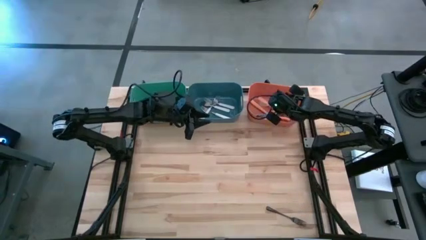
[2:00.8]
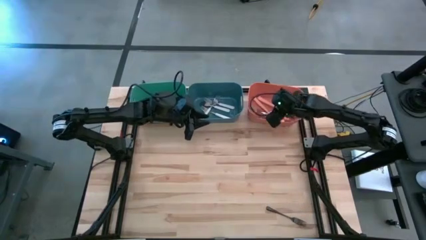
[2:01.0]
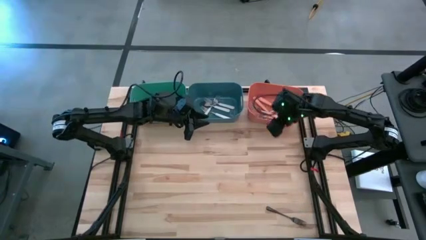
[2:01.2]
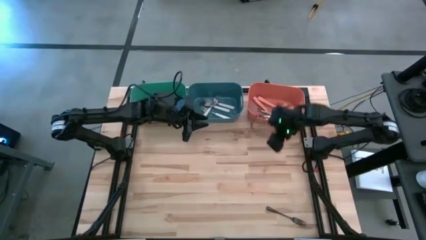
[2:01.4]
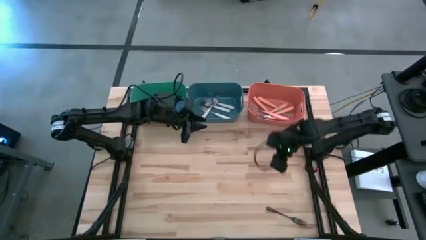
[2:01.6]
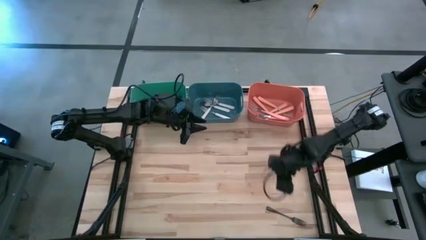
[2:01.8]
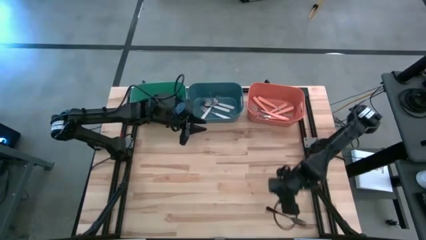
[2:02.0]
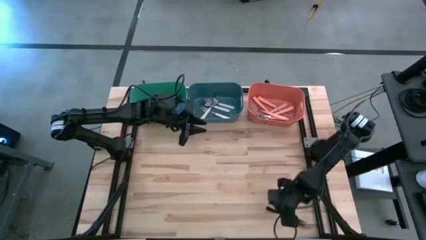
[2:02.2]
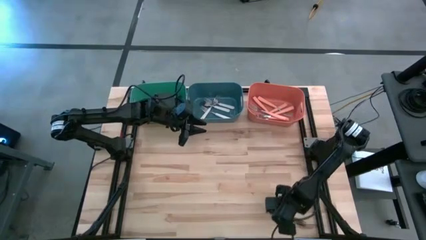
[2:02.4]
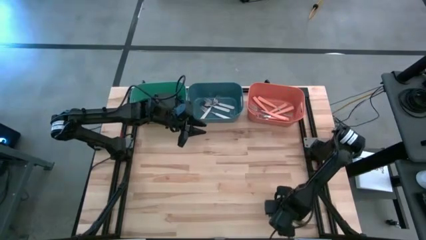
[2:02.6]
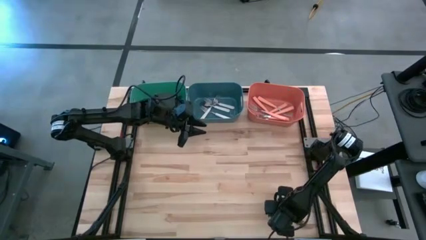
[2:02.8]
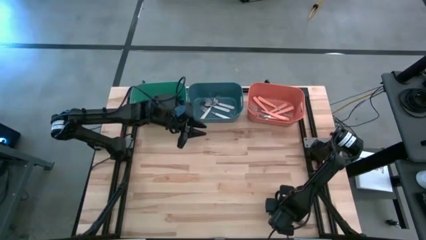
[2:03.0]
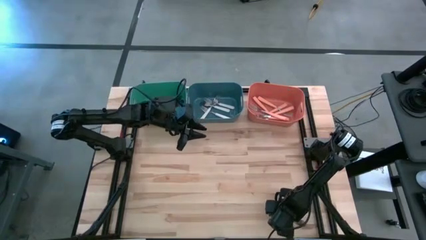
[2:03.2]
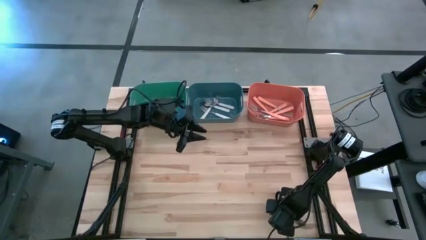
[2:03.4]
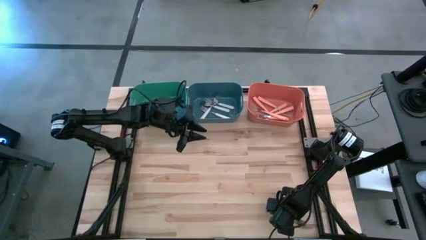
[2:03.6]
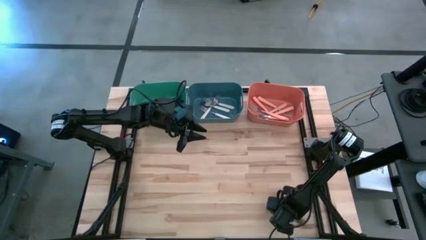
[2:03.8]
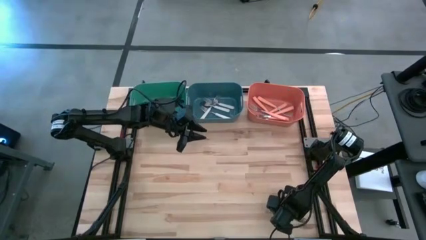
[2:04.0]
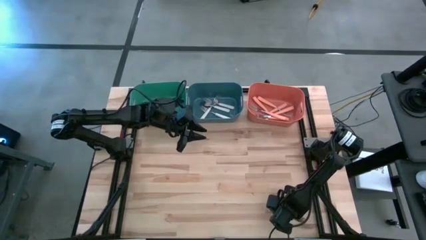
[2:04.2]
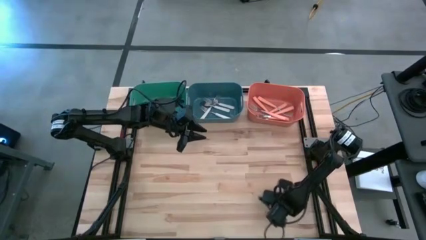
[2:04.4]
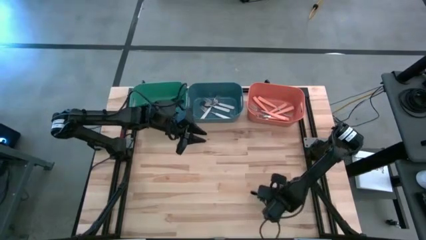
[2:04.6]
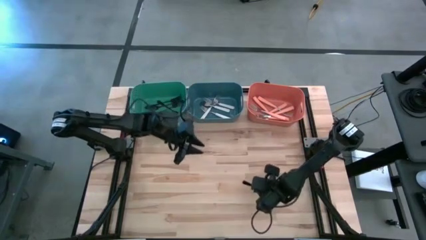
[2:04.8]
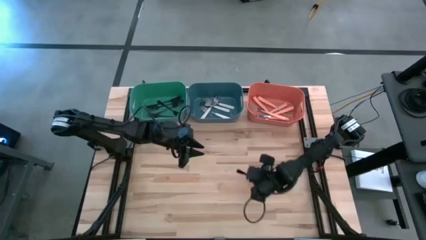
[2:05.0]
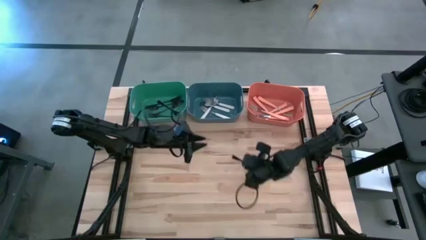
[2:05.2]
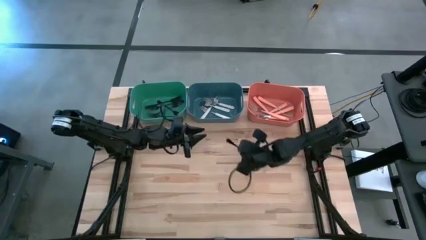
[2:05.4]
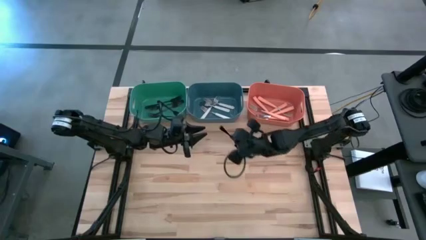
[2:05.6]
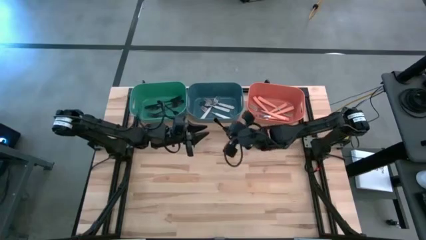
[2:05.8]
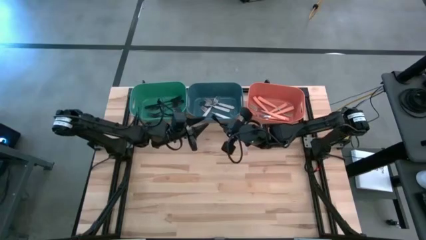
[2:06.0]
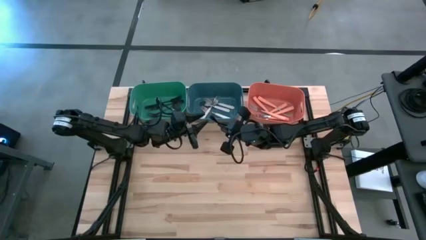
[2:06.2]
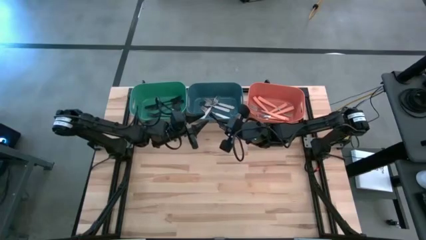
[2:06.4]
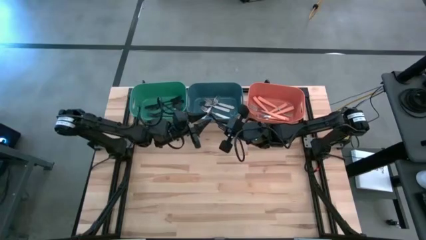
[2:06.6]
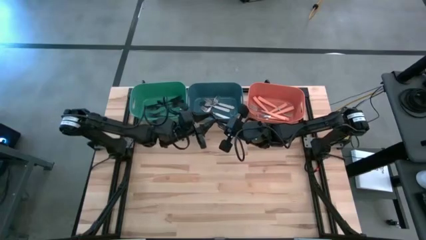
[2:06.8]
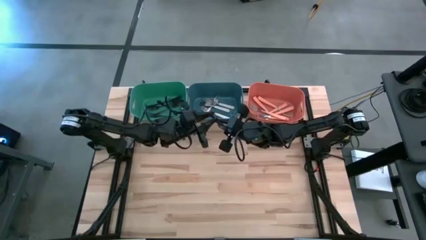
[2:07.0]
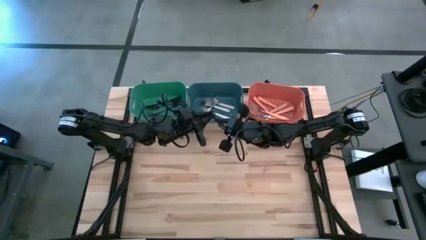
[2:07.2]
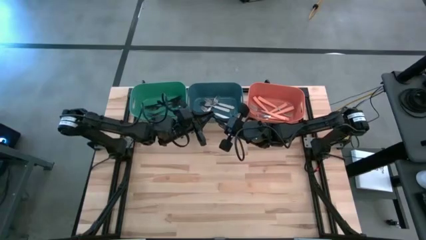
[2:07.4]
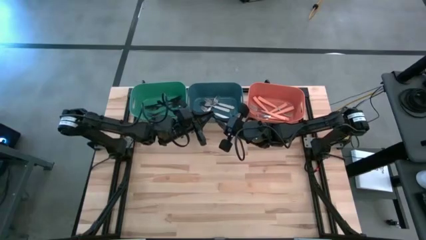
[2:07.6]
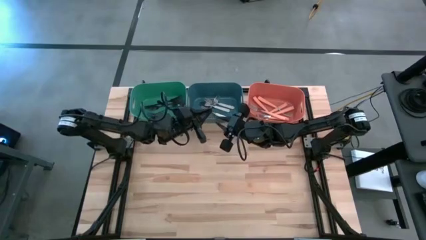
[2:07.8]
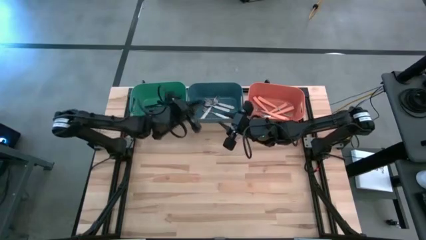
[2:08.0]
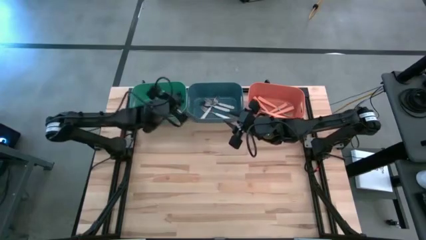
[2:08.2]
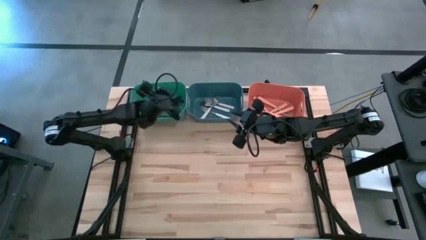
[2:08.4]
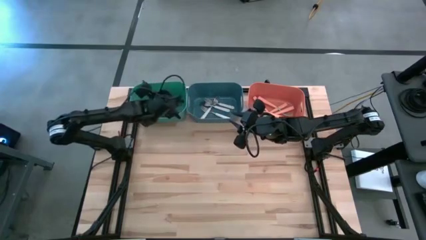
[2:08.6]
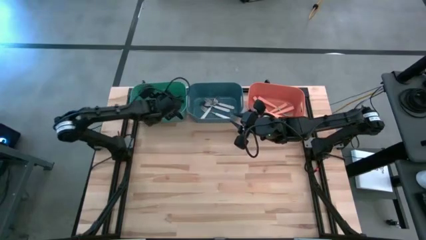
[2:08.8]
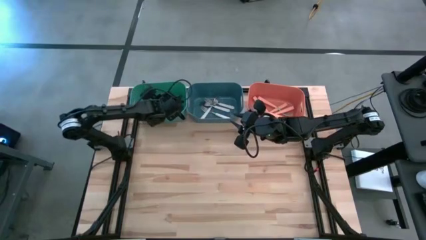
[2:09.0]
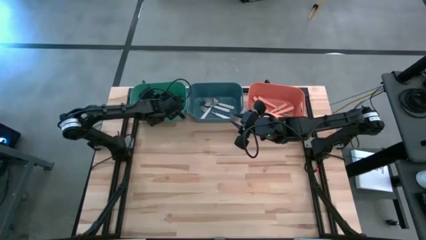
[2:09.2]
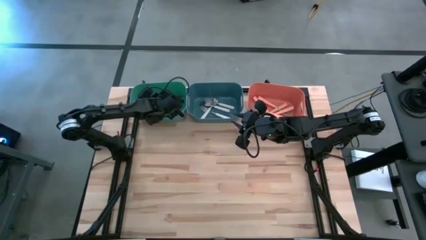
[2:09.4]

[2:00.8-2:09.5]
Task: Sort silverware by color (type)
Put the black fork into the green bin

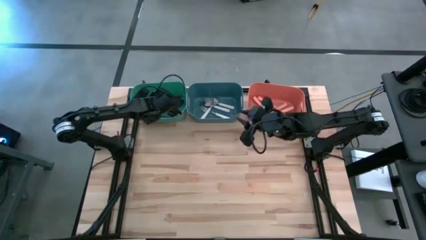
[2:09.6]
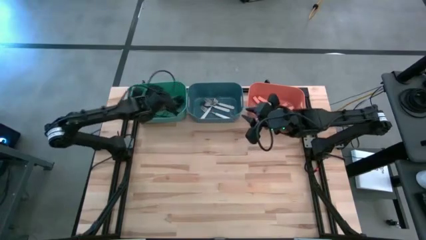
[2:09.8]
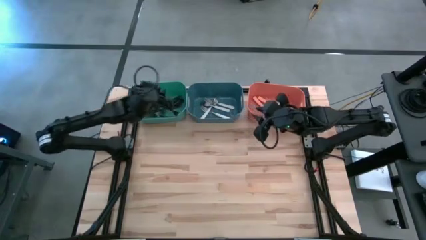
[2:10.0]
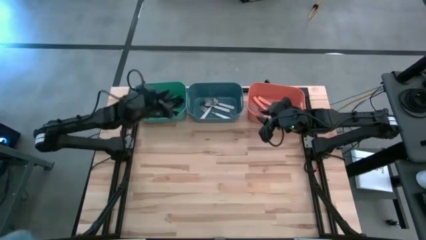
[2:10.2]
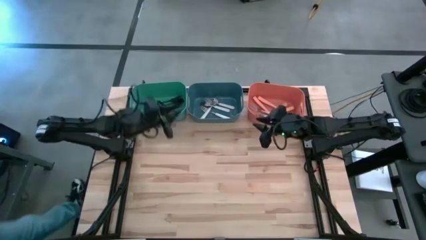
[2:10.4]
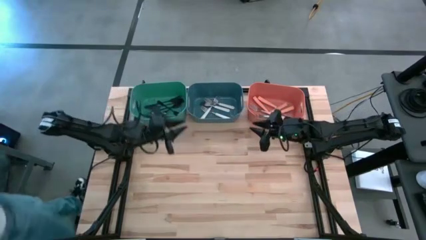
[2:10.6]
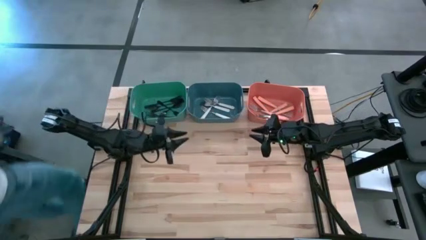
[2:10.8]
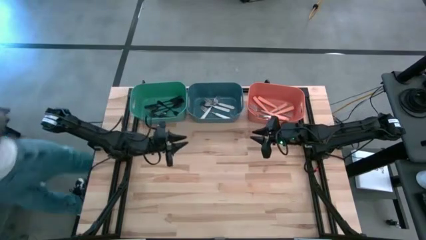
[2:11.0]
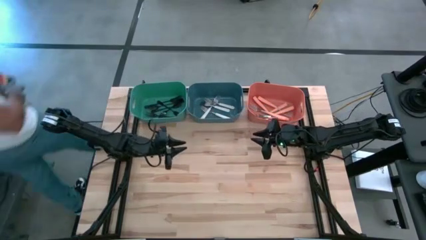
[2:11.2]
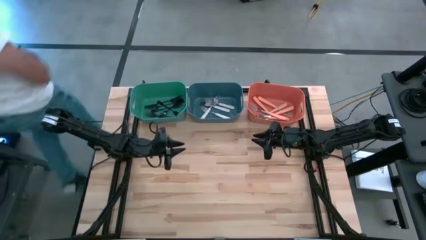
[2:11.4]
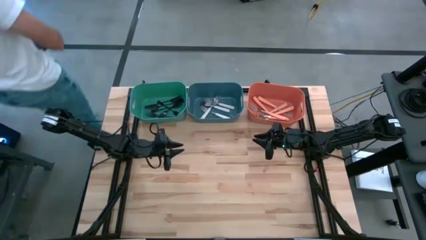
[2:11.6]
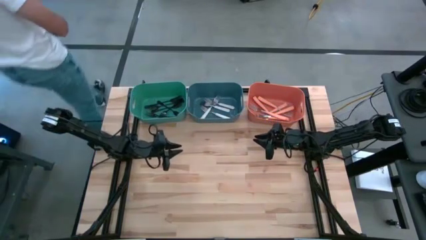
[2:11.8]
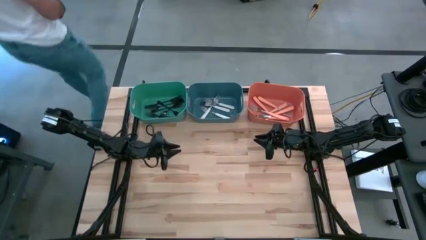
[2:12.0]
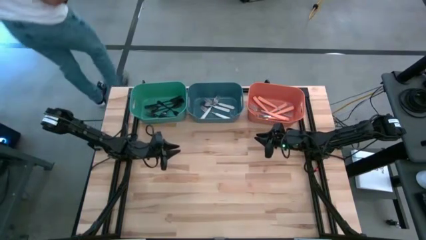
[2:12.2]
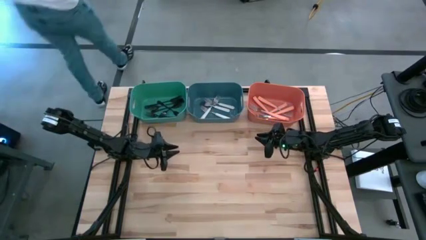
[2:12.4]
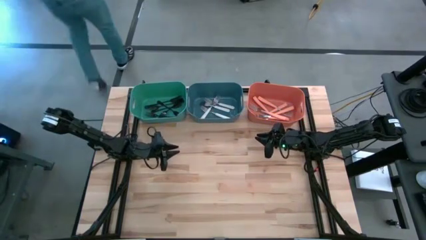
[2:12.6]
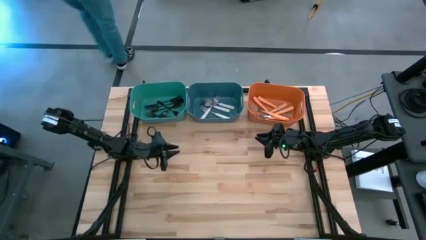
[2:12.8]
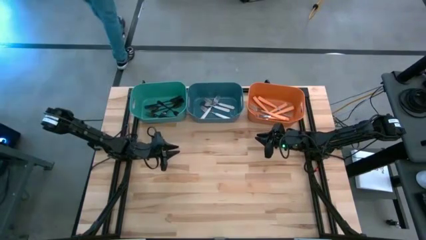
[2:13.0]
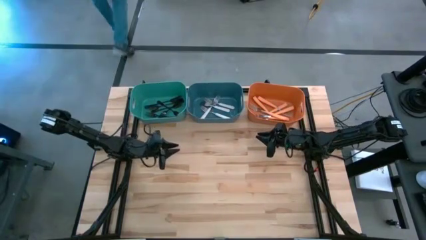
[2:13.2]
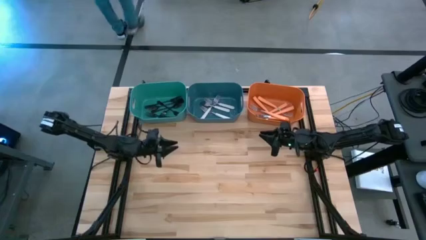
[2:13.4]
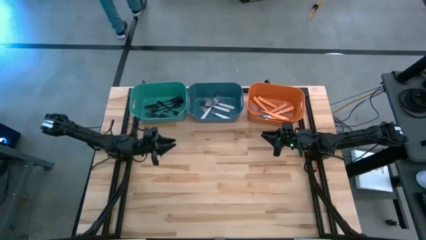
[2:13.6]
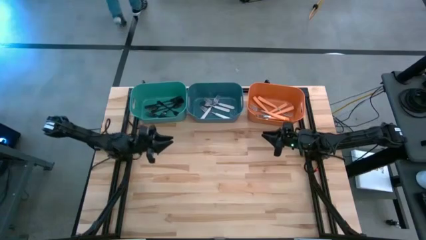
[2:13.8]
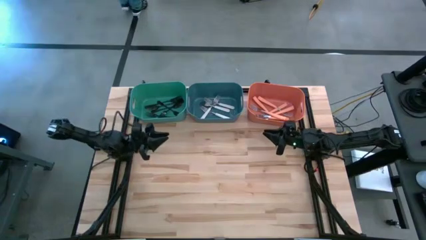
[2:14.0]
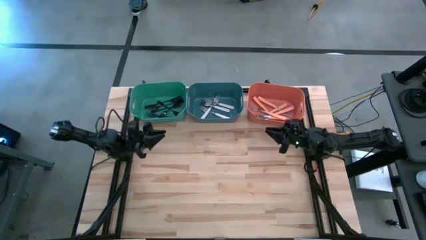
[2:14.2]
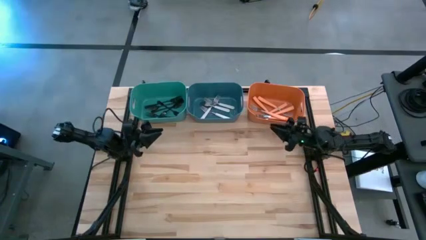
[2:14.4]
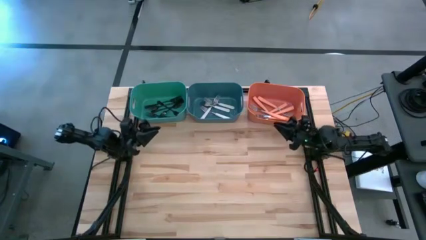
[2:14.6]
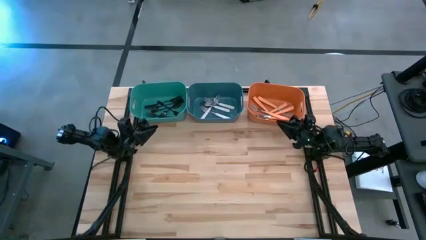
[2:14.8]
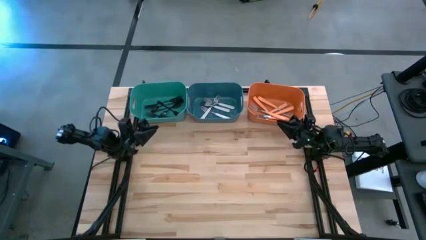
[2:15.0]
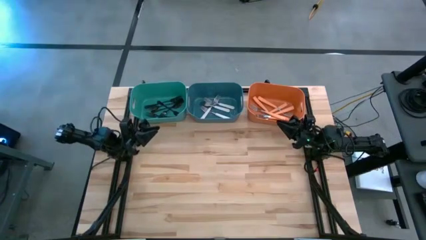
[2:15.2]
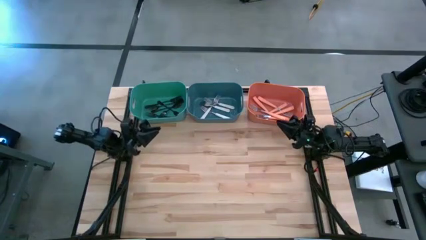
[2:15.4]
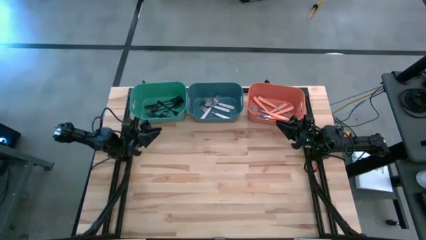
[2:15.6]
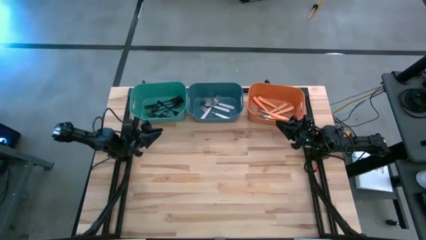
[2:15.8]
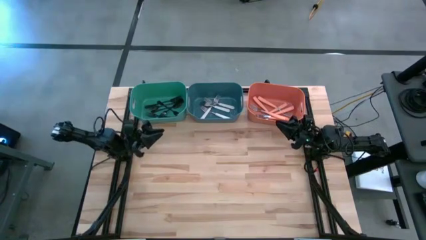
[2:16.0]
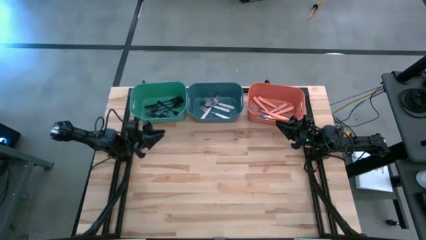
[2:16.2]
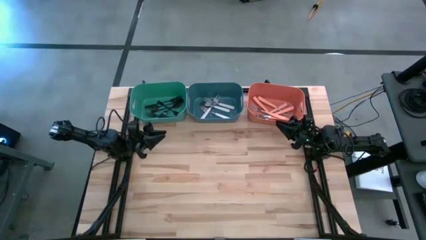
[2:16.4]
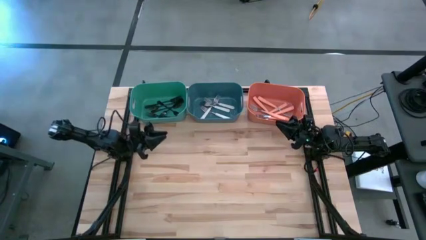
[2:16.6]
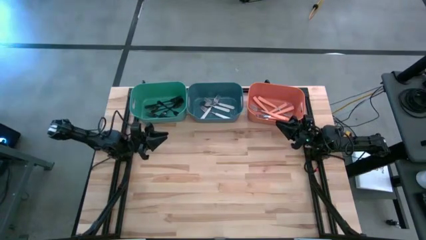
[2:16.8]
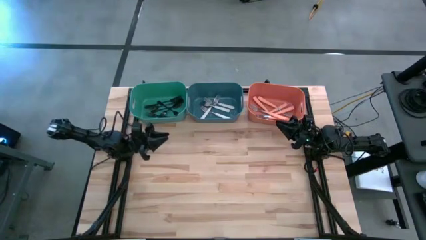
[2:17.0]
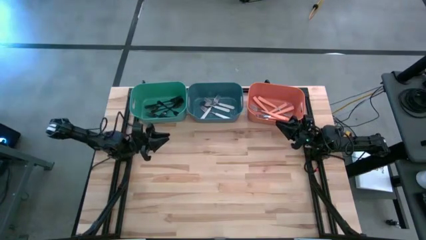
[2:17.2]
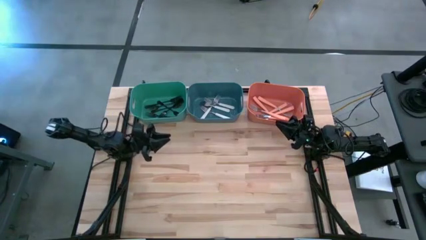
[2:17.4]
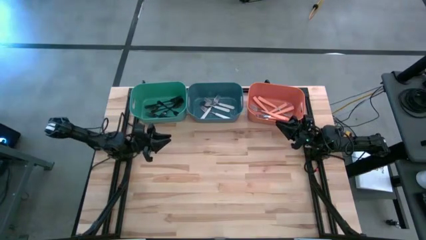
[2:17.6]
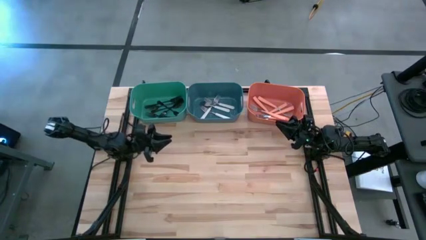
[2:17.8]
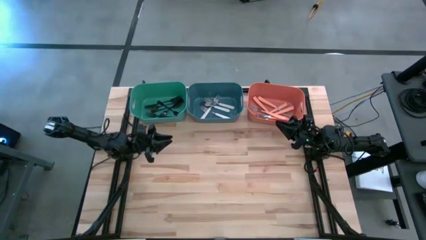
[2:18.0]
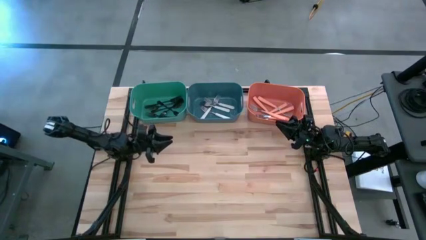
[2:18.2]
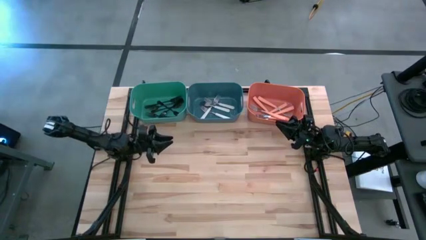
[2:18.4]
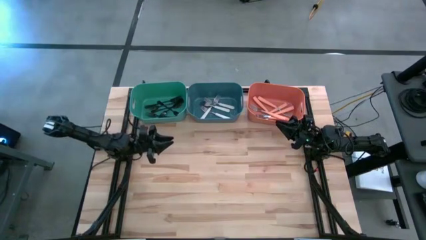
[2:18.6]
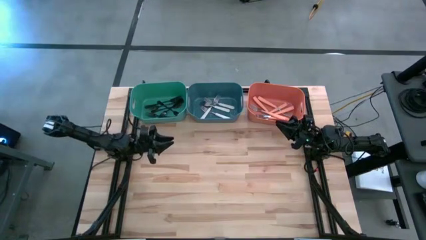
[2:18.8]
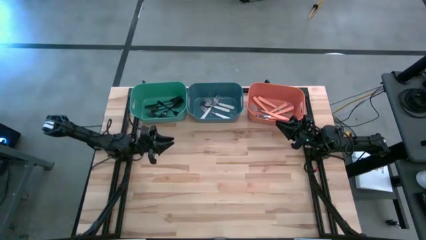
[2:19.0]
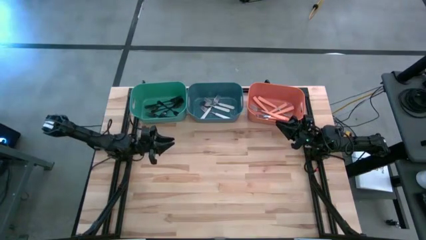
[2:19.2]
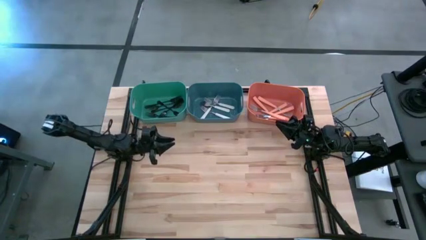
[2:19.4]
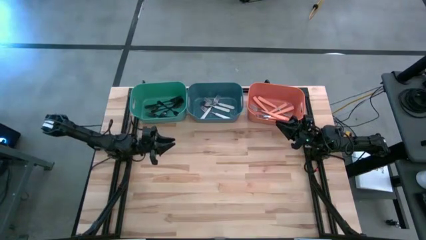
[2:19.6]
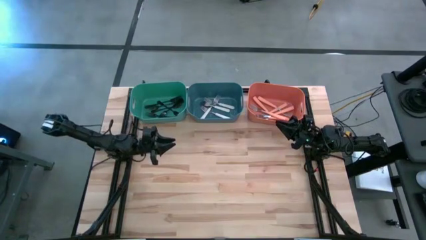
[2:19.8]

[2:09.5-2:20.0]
Return to Home Position
